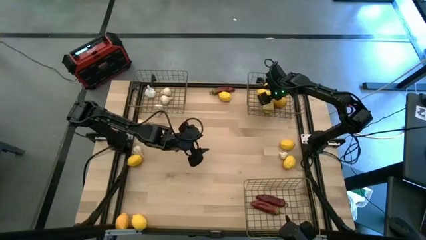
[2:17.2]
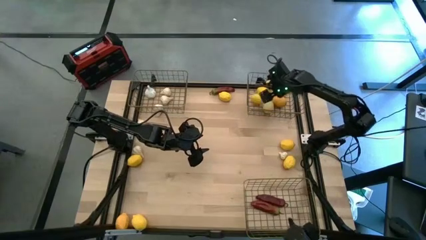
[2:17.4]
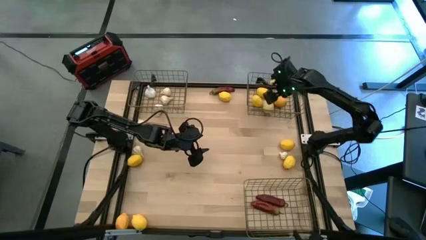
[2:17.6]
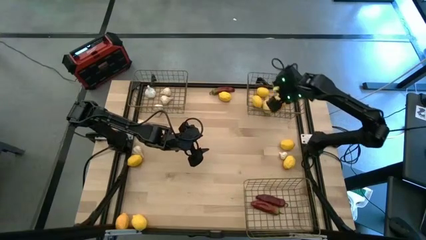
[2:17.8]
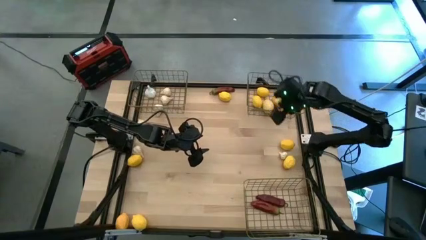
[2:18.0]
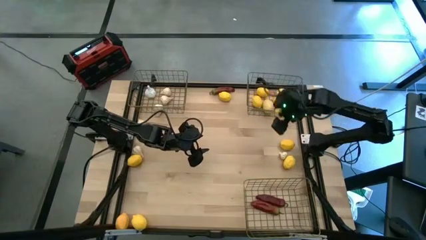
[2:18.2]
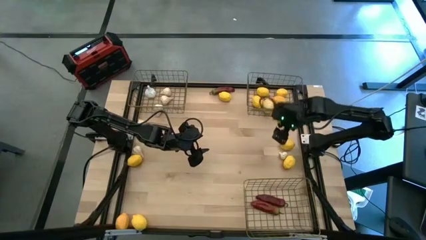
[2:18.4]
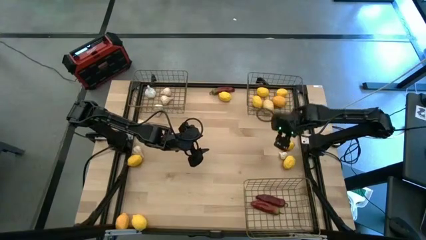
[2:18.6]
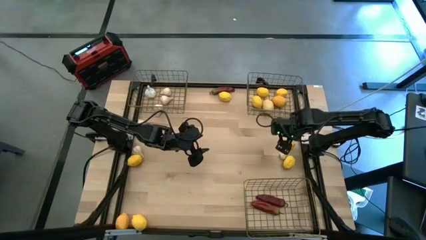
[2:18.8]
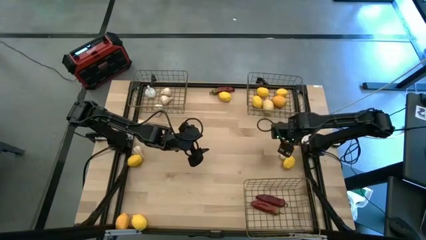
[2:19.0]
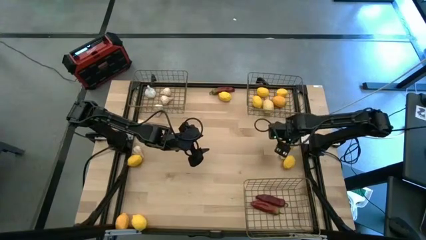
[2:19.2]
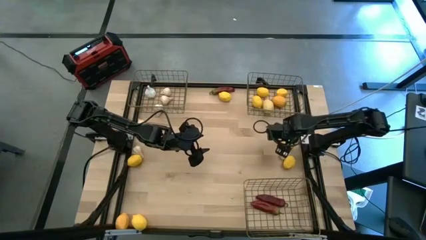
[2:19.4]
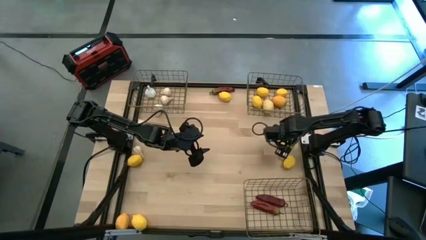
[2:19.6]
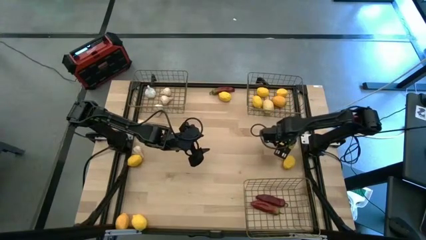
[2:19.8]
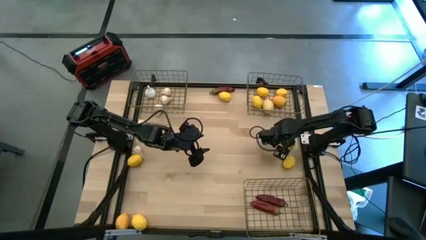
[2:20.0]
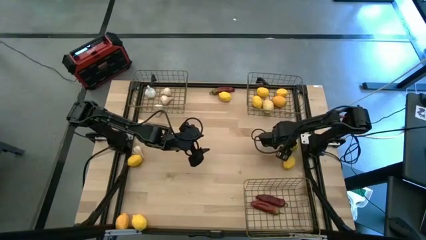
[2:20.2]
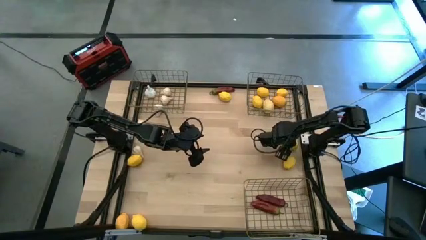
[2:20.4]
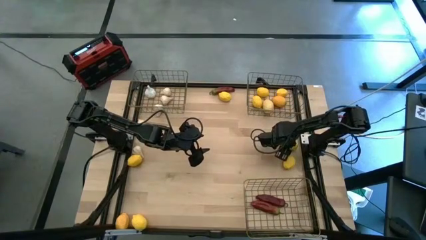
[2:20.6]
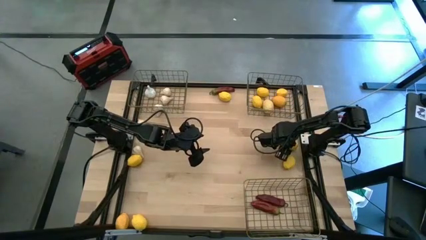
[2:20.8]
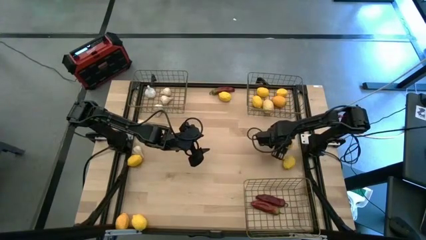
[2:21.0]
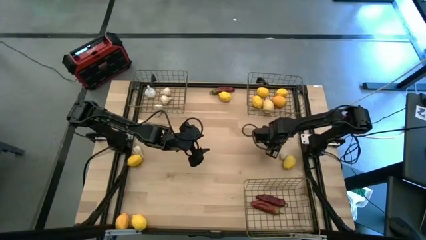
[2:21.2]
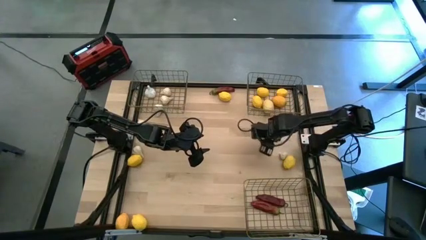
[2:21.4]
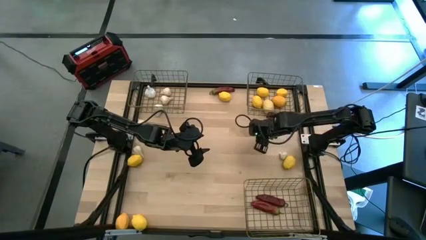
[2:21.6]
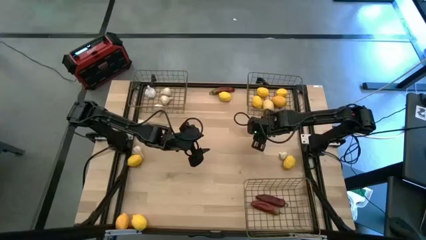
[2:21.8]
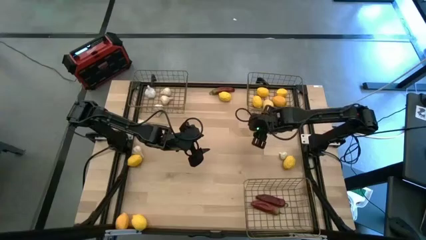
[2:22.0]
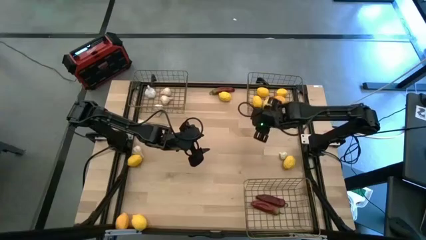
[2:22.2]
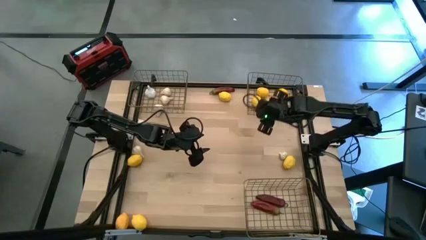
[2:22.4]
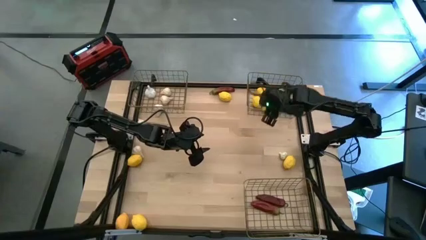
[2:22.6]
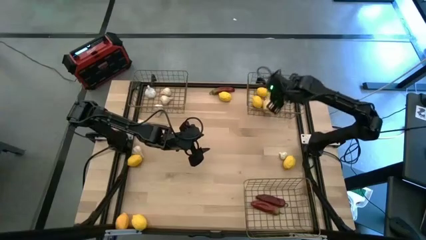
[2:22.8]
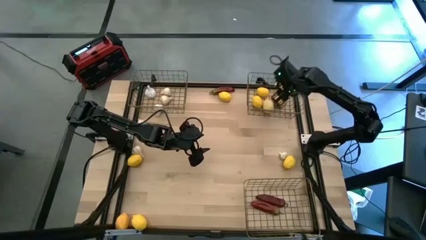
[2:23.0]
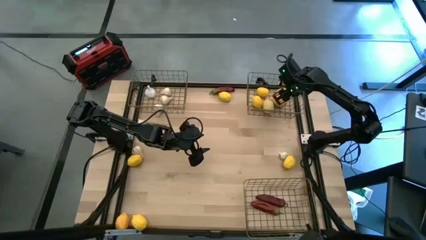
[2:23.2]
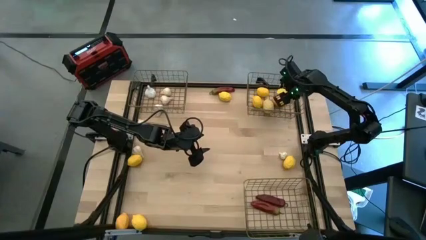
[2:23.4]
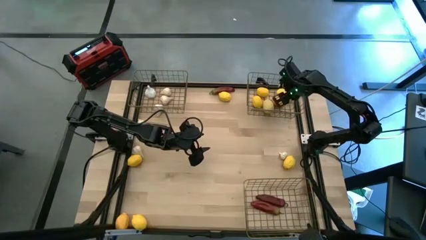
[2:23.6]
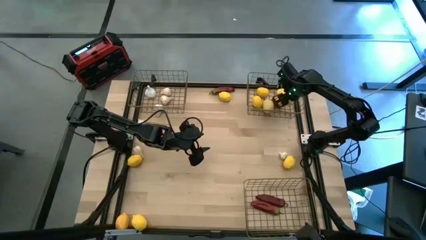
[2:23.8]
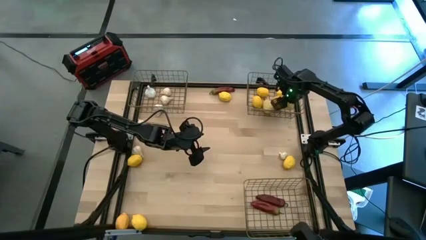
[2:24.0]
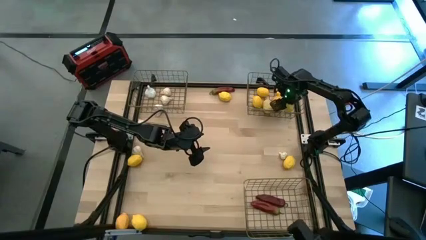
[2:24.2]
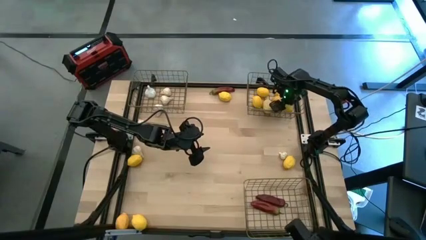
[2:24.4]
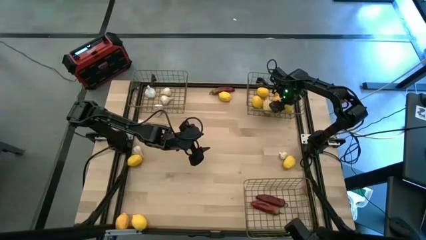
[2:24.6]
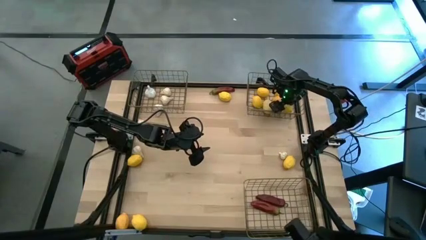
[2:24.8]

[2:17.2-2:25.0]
Task: Sort produce into baskets
Put the yellow lemon into the top right wire basket

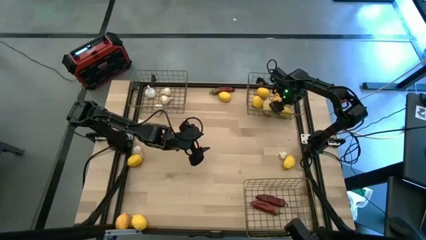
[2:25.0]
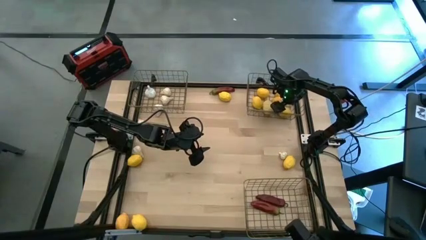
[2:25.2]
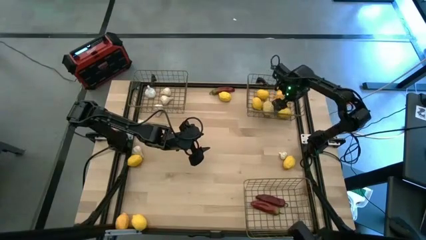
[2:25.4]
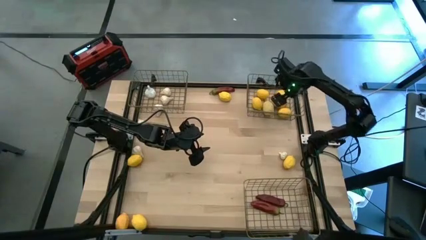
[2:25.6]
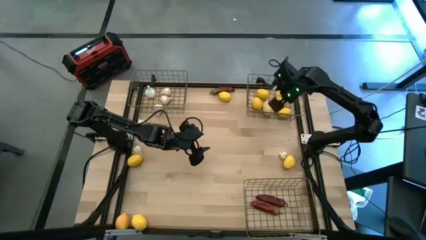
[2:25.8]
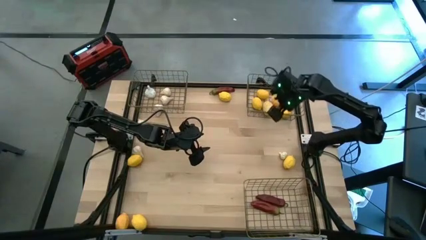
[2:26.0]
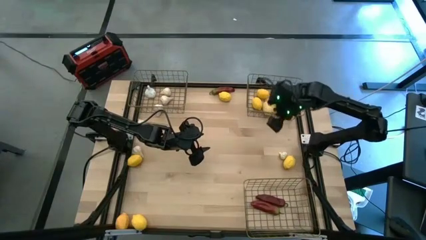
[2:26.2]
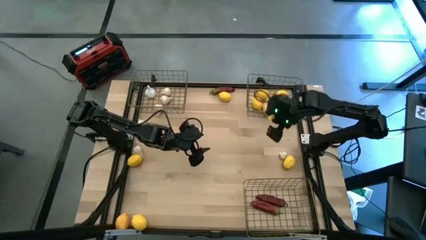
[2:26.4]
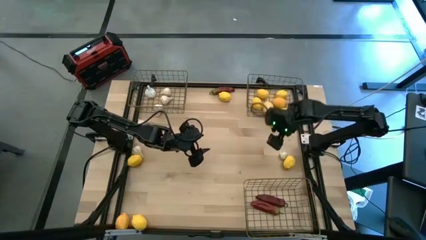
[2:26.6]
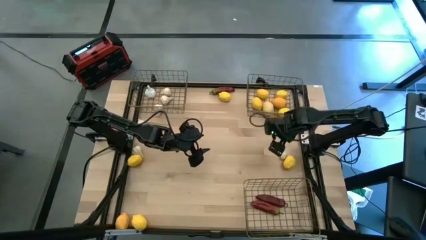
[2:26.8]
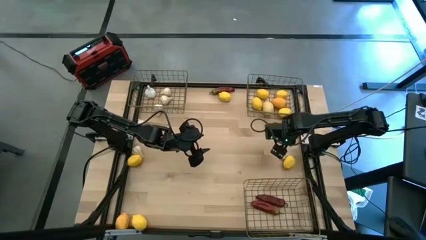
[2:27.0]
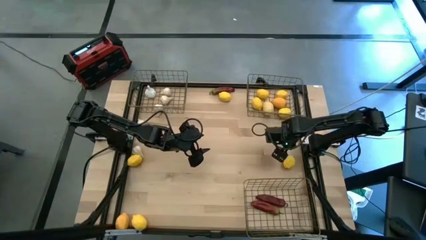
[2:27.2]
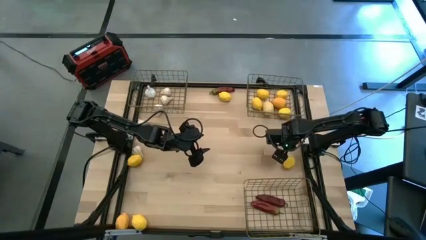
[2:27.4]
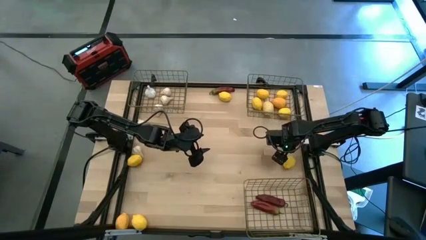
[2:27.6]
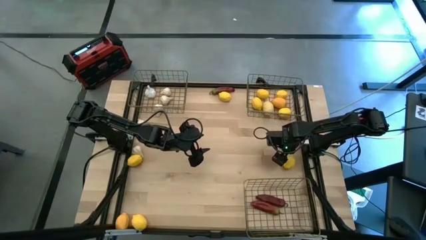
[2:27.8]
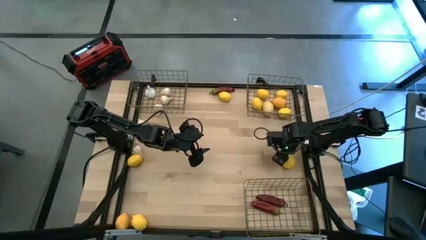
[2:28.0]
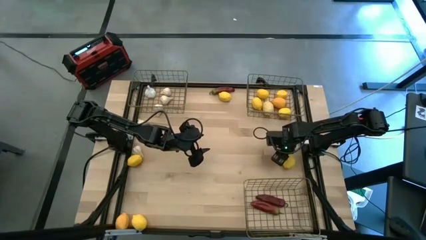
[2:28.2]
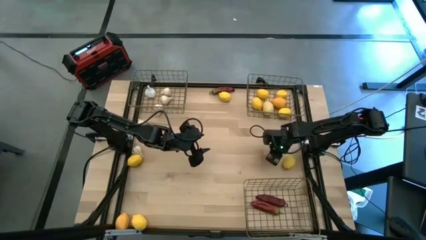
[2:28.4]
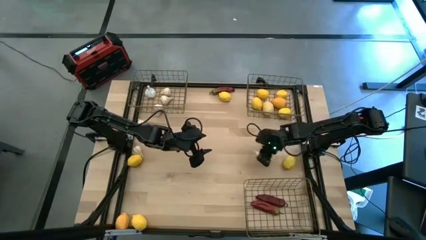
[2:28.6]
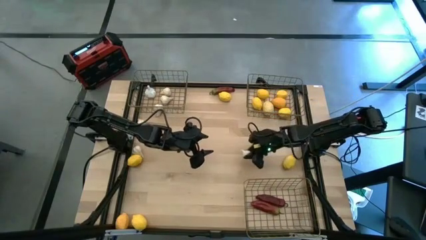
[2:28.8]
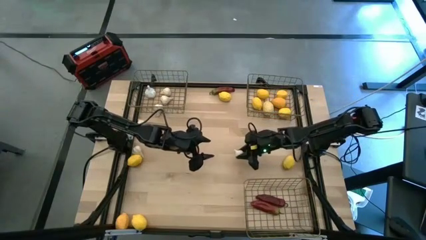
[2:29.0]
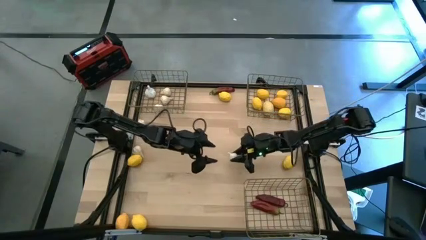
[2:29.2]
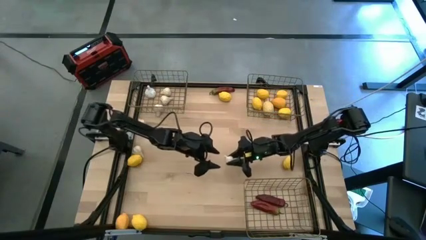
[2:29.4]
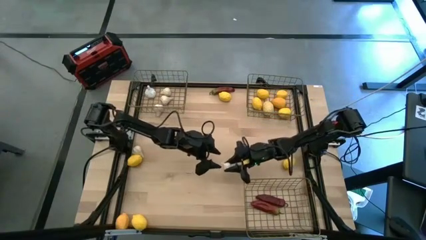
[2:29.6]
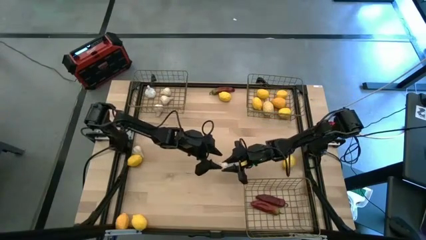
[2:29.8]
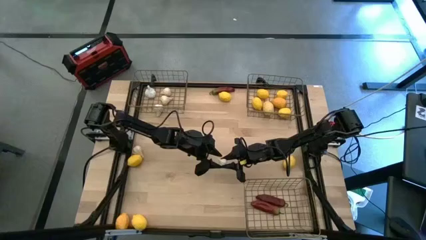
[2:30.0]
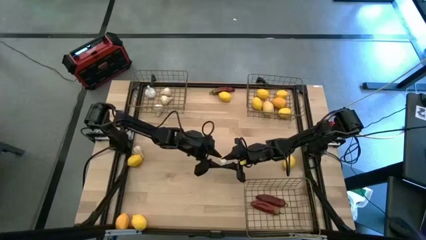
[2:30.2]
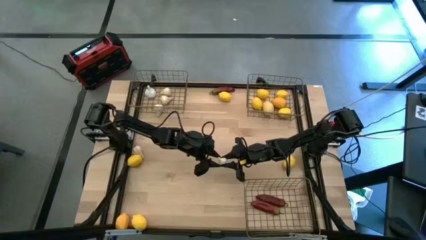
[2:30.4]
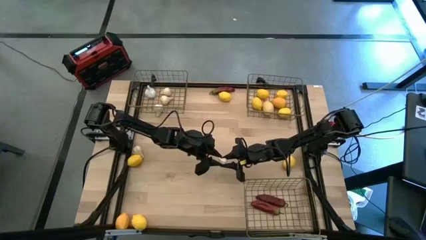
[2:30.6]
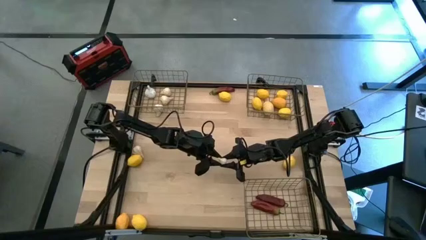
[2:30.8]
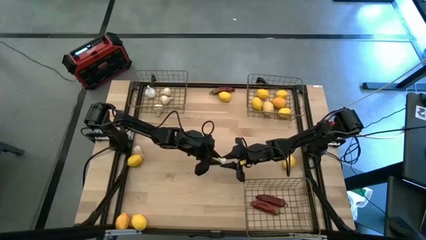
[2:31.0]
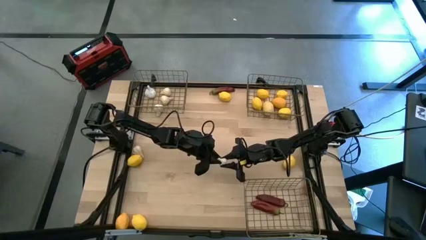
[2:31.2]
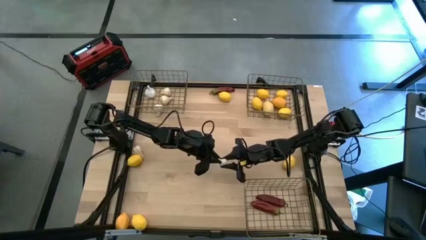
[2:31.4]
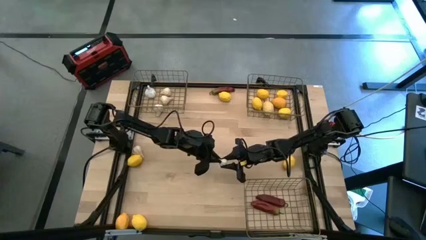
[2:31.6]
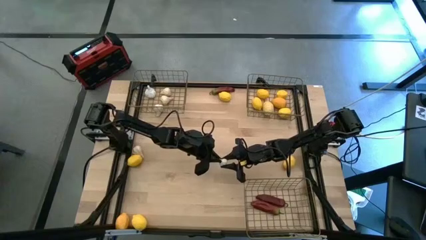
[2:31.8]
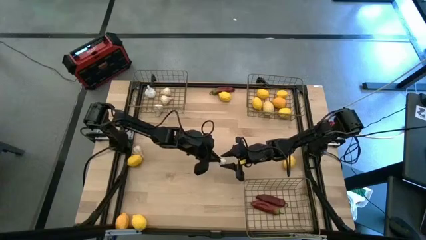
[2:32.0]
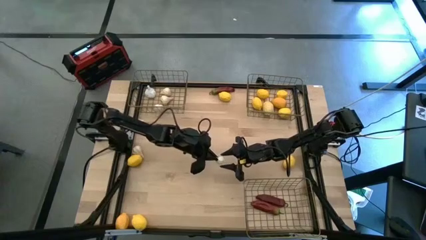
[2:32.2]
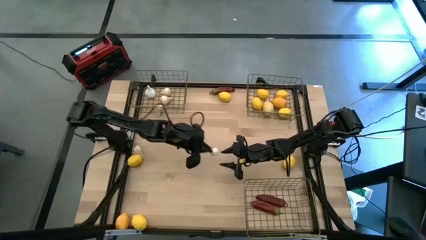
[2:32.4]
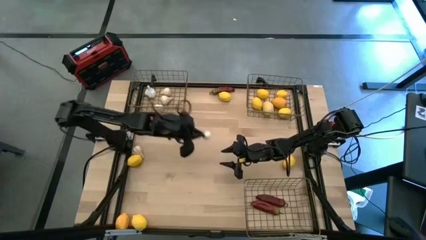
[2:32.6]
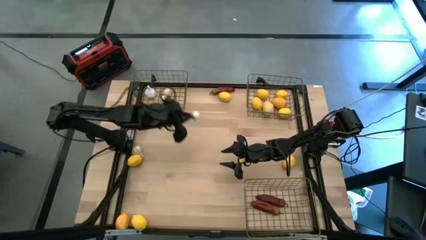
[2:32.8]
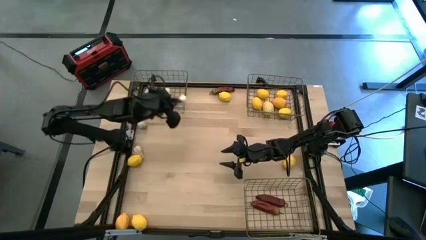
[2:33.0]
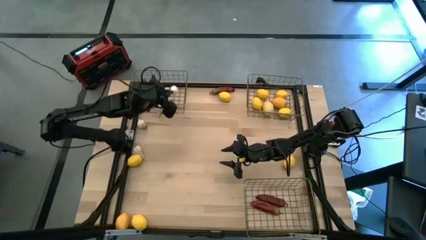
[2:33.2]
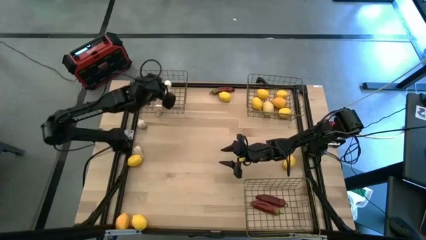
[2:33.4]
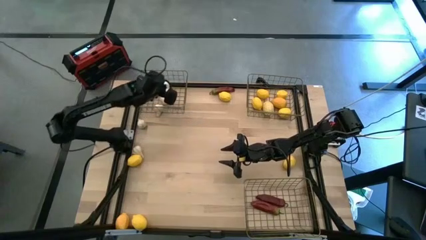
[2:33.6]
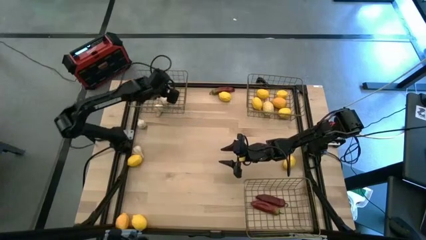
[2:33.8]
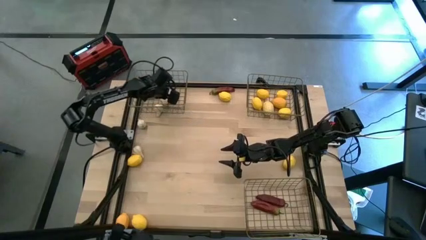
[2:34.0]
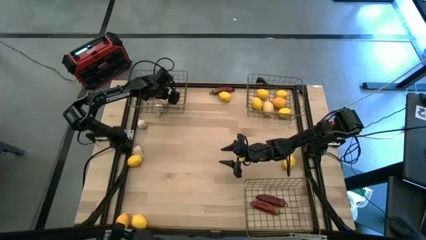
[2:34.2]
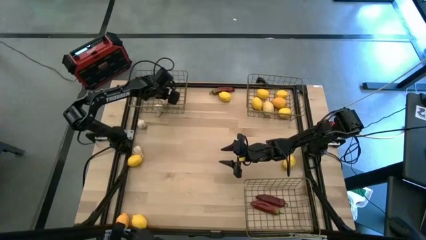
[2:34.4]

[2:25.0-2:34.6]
Put the white garlic into the top left wire basket
